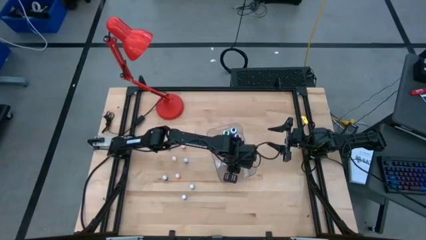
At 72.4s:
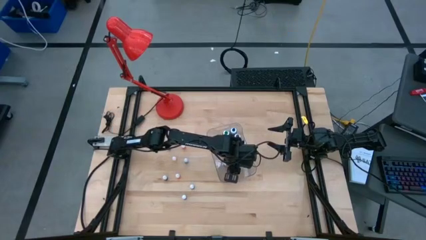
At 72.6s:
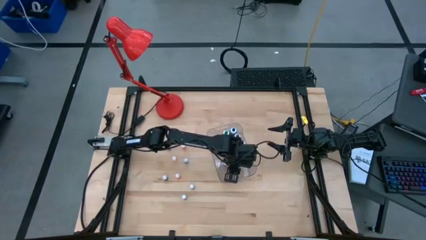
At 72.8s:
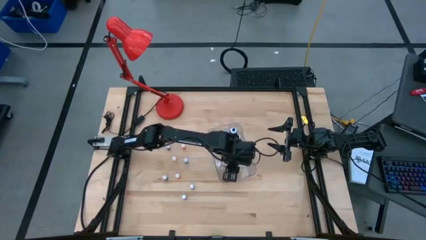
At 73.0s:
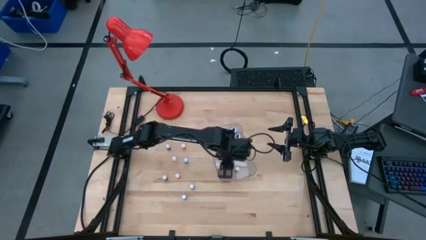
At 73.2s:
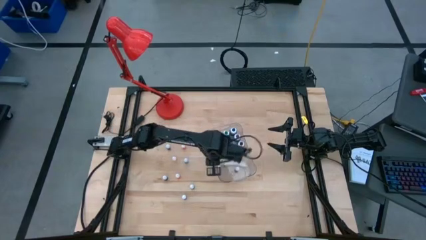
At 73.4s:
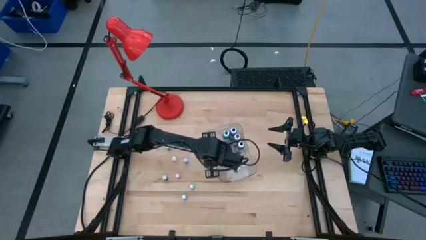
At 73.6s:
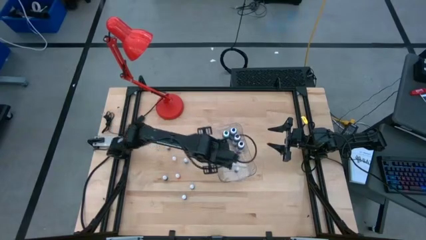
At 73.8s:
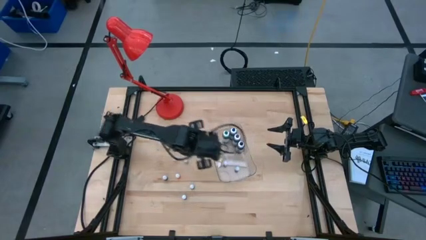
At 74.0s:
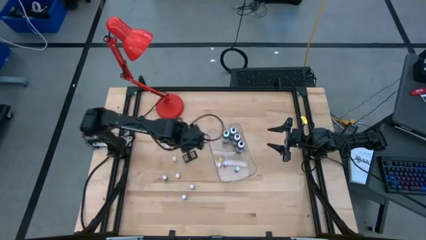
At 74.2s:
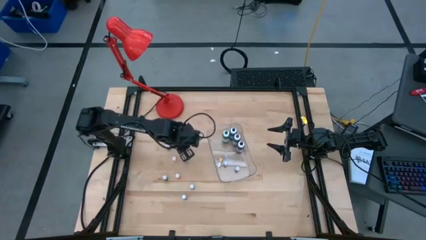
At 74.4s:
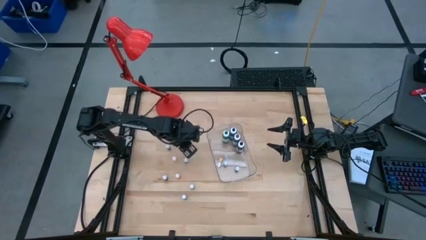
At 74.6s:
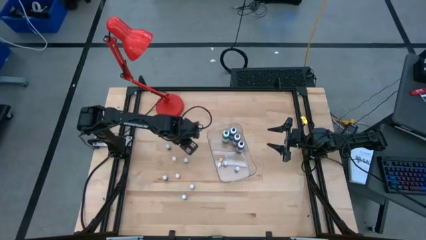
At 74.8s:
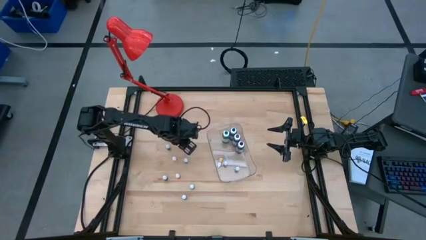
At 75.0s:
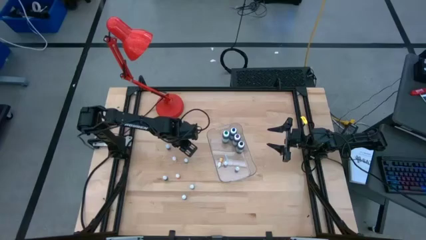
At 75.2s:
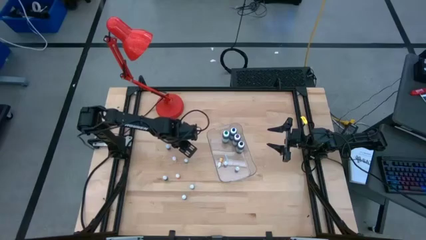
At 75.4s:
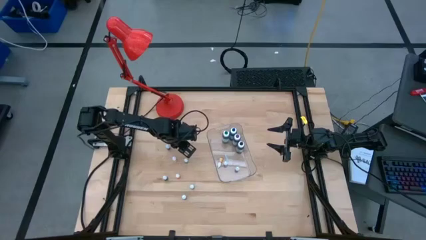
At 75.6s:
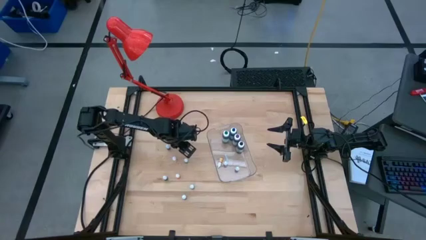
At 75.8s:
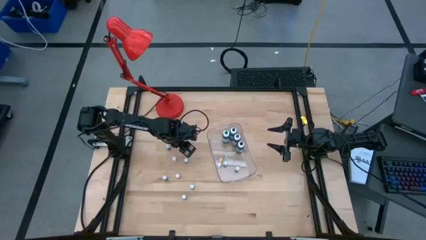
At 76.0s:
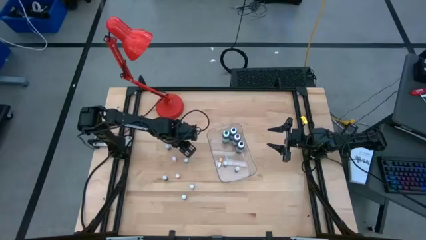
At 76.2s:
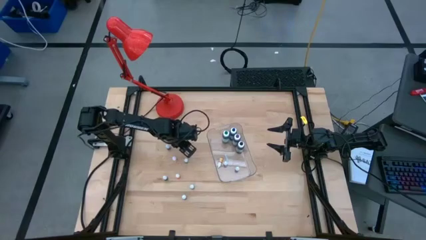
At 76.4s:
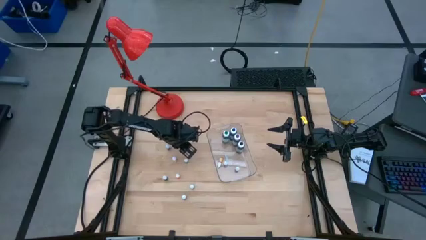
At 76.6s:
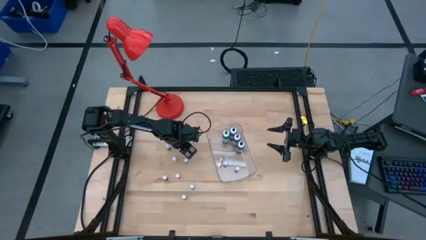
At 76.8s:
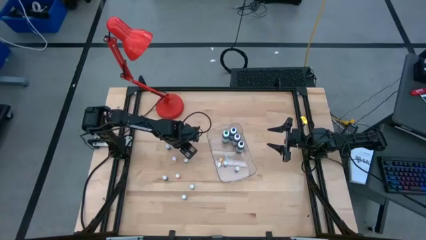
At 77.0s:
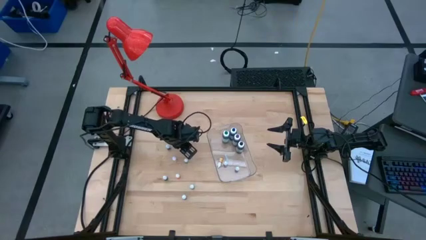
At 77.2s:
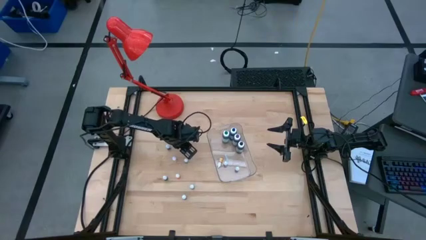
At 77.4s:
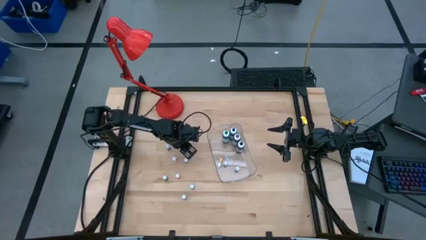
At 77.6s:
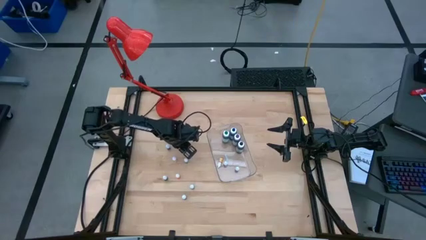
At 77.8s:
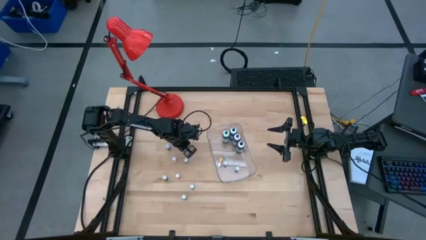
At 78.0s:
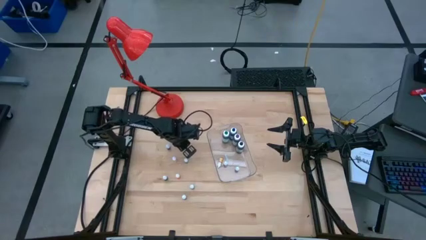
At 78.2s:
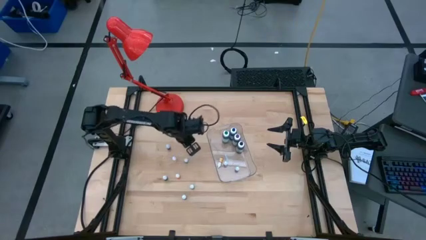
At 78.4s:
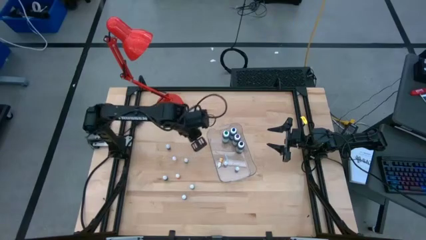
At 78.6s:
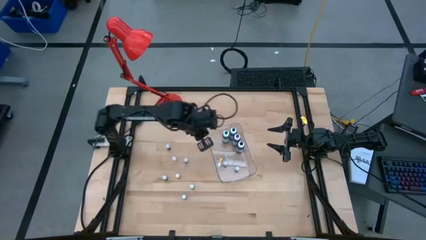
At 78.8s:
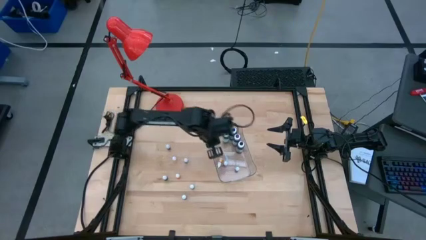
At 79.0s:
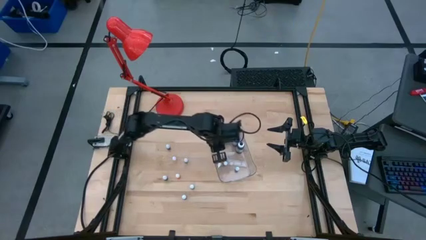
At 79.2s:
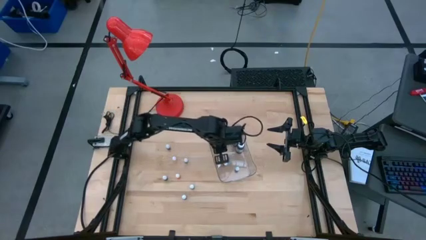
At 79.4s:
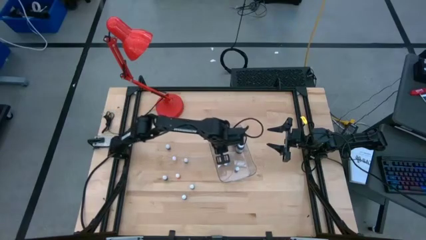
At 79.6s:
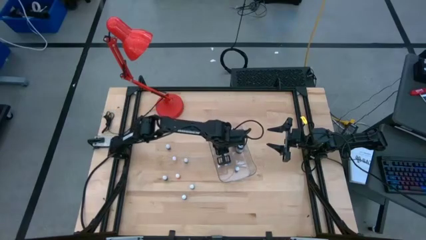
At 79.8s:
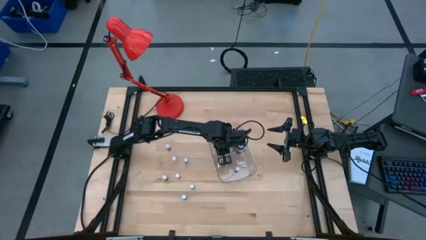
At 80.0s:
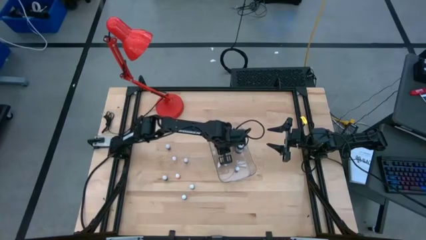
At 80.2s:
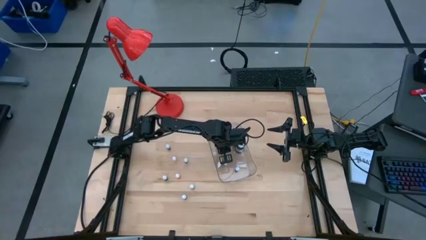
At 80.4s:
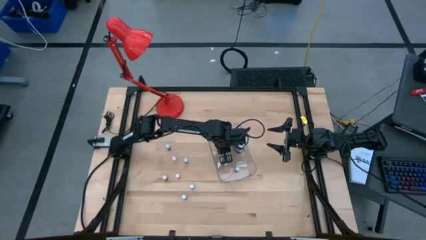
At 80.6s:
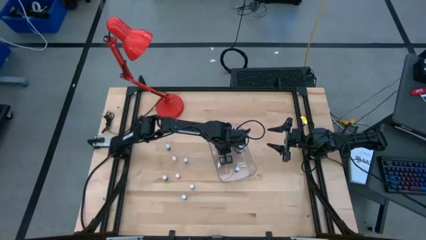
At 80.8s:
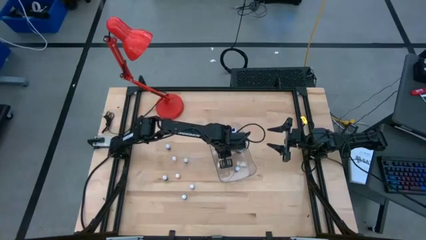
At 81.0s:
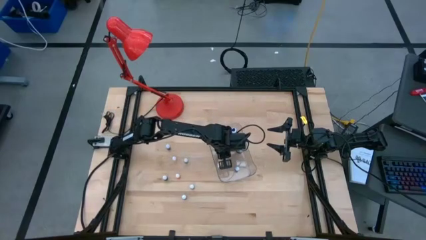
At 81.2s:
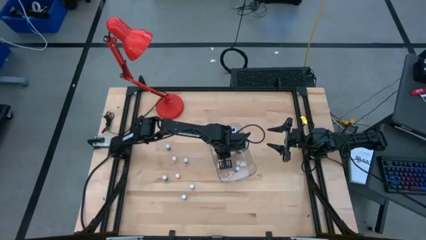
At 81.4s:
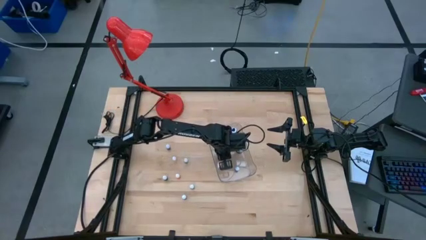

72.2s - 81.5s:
Task: Pick & Place food coloring
Put the orange food coloring bottle into the transparent container

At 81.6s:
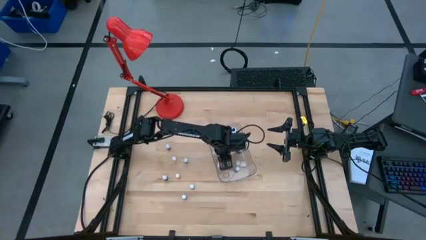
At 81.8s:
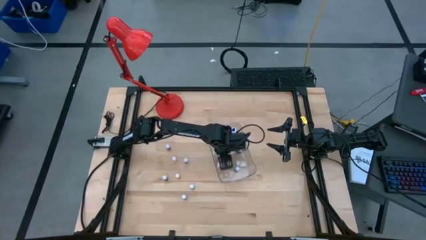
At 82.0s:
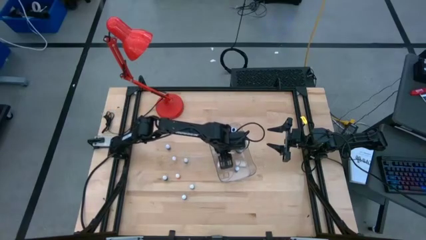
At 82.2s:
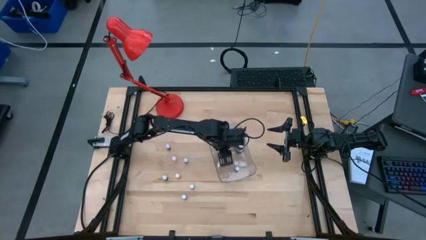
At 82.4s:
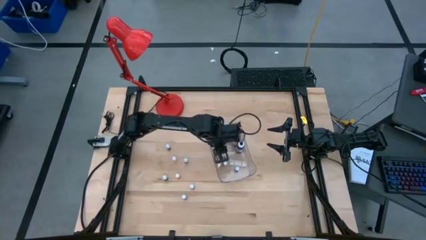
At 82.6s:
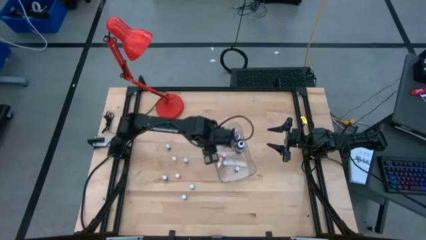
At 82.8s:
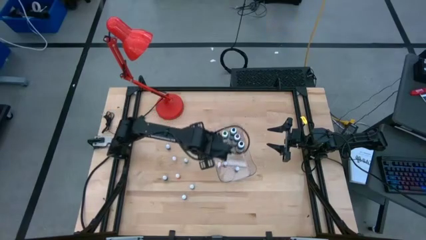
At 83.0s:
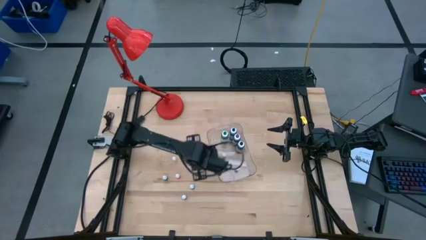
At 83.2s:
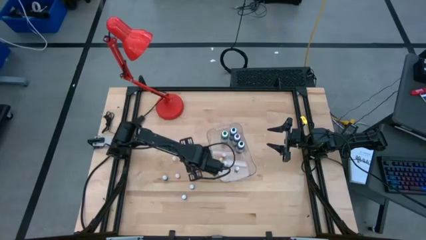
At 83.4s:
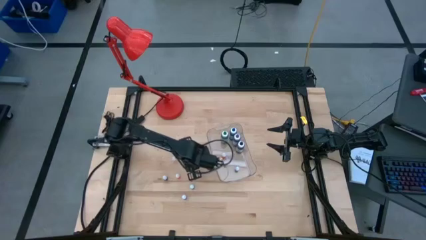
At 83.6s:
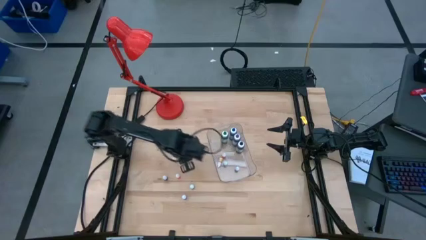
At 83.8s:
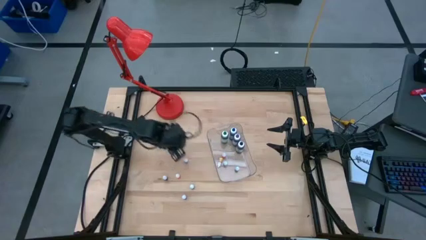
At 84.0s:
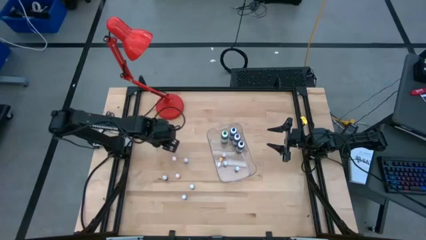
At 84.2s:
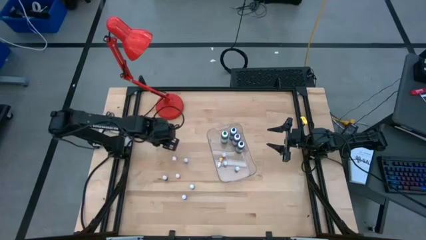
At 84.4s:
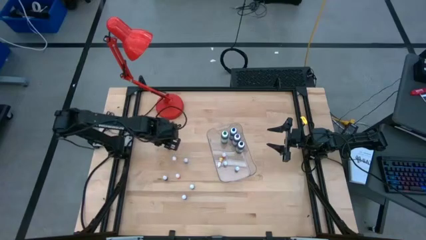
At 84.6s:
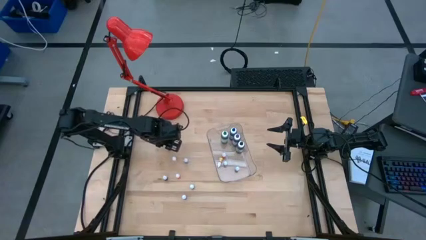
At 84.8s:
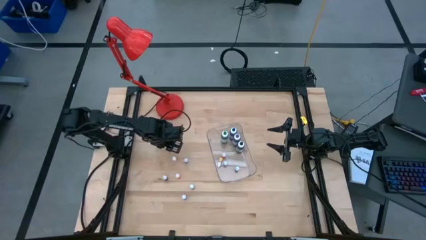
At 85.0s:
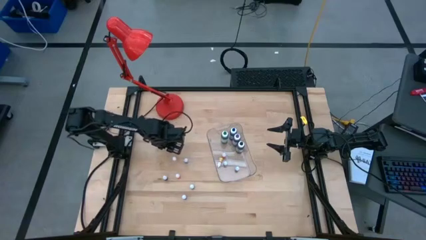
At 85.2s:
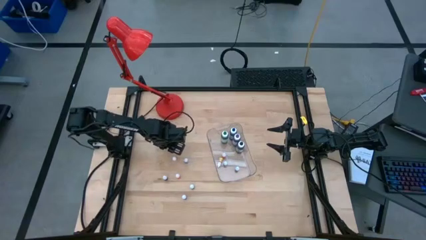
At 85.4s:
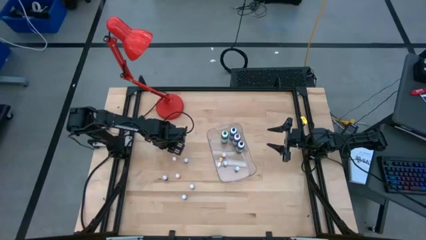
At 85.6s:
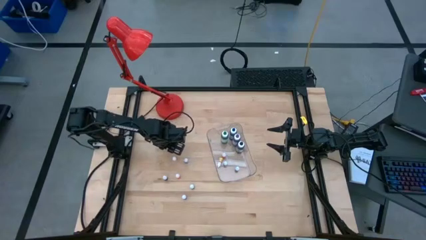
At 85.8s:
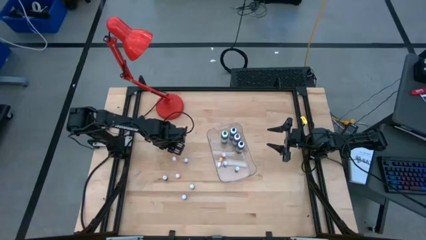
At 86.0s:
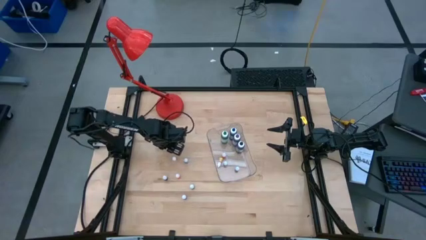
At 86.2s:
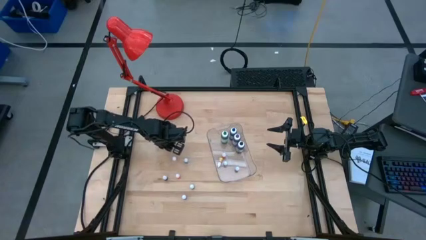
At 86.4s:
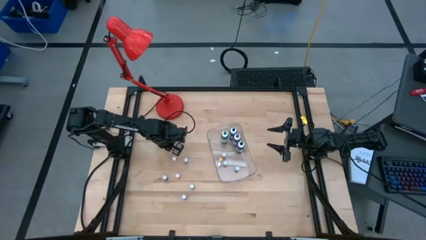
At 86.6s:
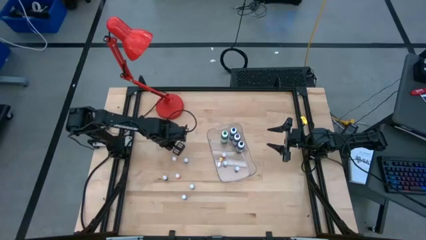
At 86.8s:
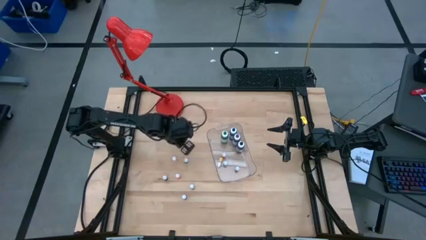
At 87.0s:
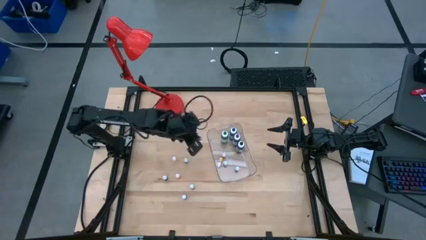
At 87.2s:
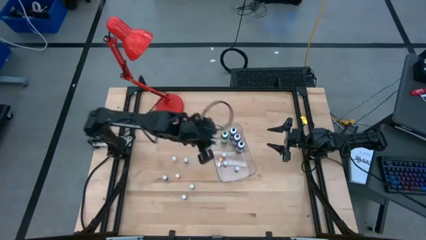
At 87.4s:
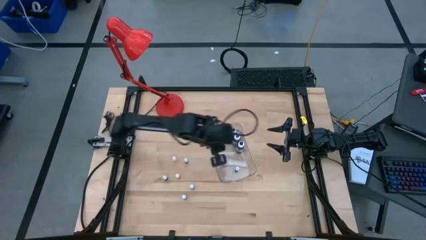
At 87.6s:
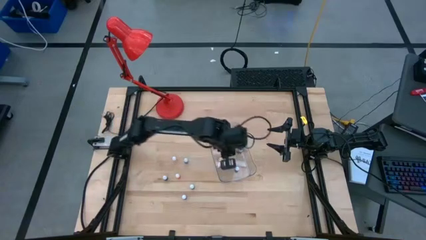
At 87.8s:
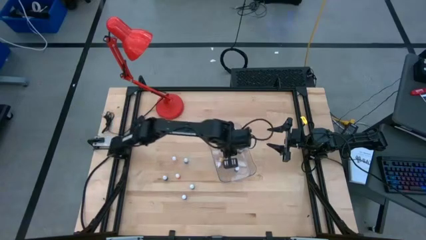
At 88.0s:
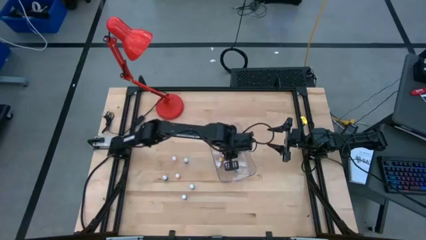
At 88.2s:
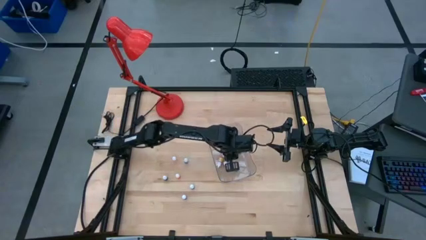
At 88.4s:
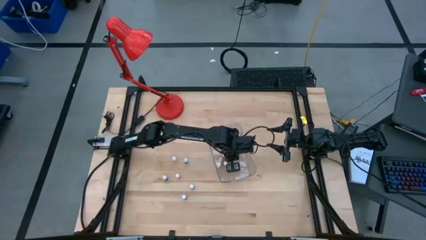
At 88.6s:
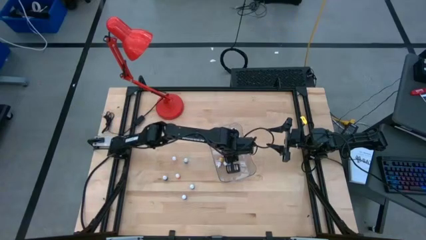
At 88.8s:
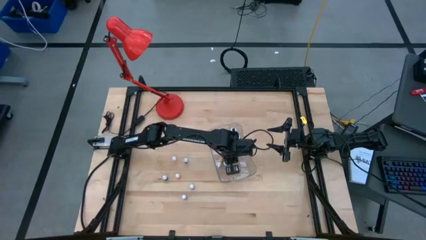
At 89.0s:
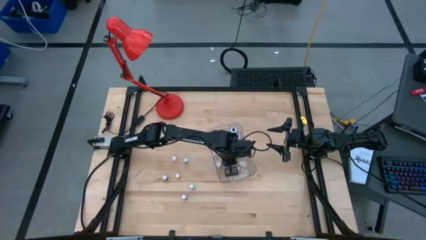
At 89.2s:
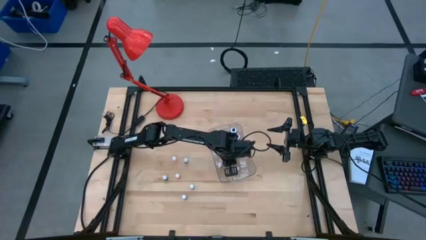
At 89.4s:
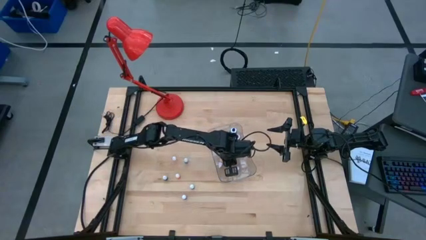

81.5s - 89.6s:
Put the black food coloring bottle into the transparent container
